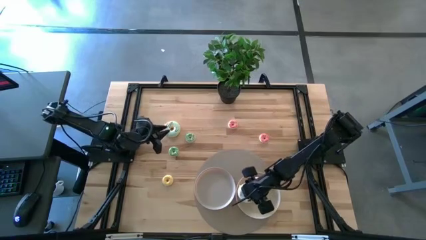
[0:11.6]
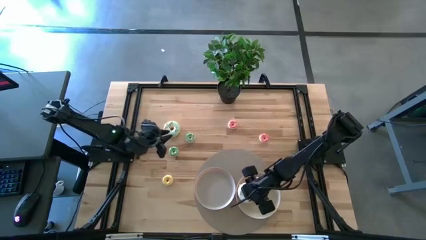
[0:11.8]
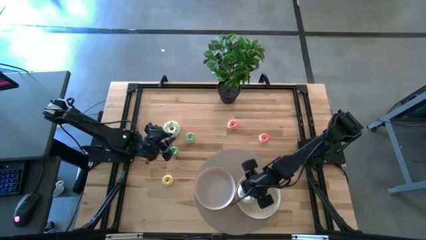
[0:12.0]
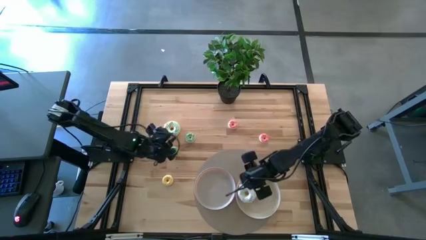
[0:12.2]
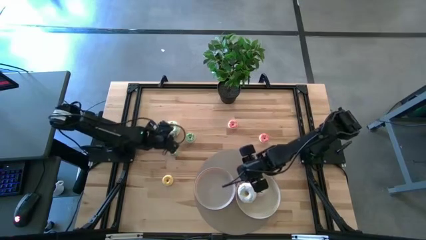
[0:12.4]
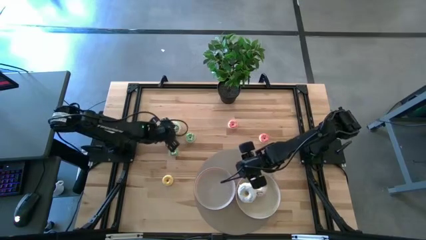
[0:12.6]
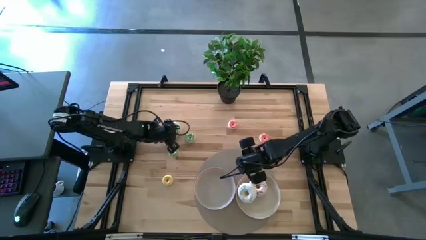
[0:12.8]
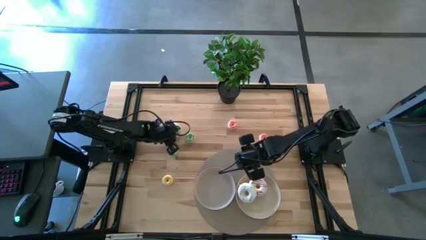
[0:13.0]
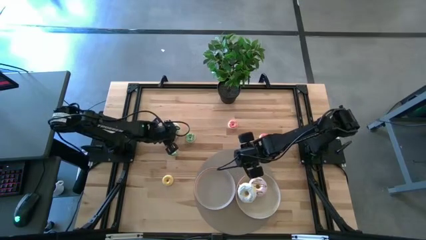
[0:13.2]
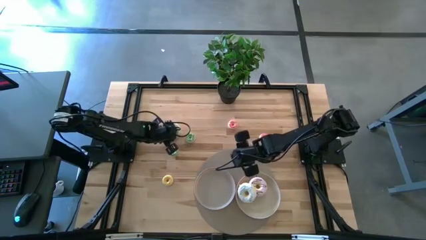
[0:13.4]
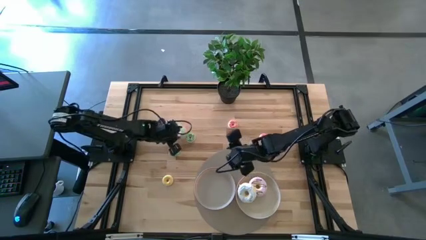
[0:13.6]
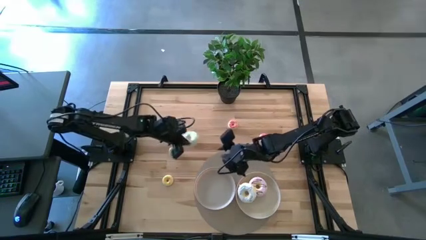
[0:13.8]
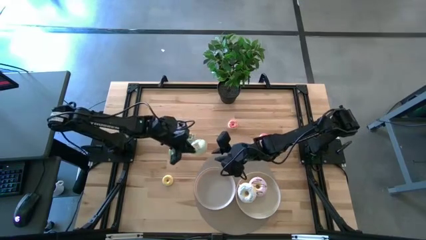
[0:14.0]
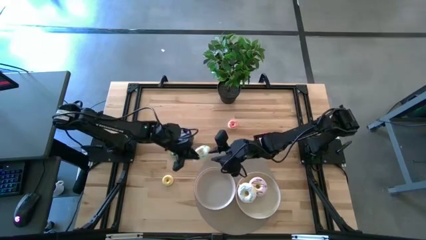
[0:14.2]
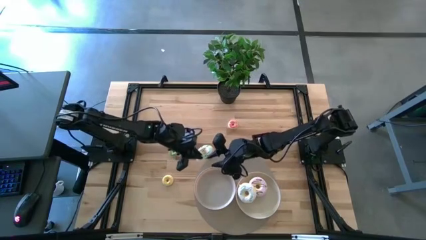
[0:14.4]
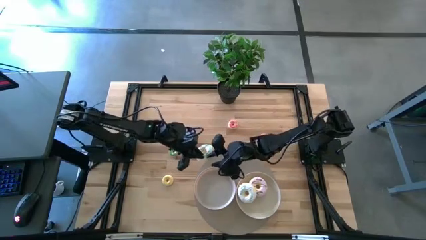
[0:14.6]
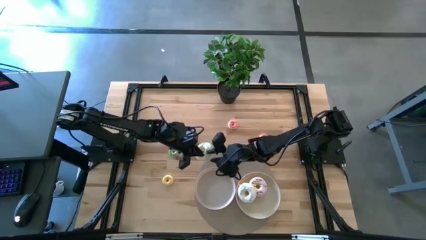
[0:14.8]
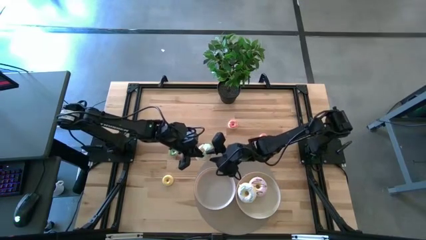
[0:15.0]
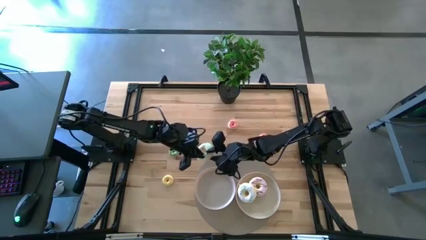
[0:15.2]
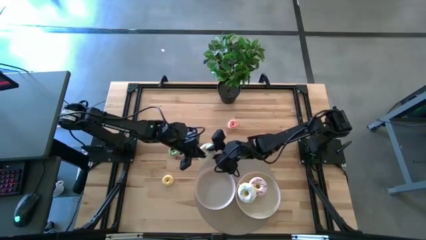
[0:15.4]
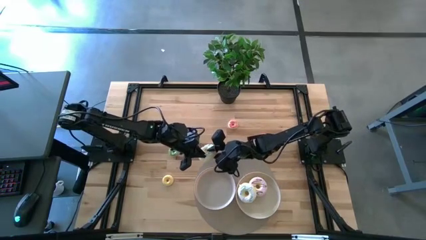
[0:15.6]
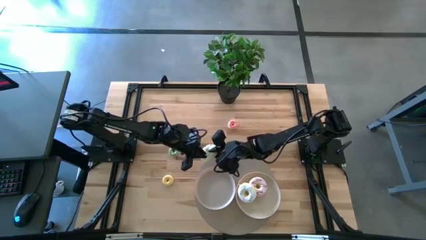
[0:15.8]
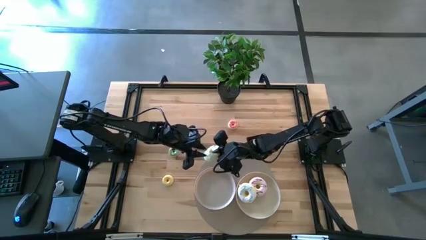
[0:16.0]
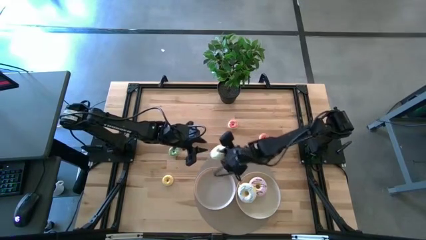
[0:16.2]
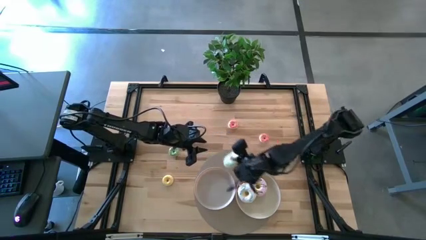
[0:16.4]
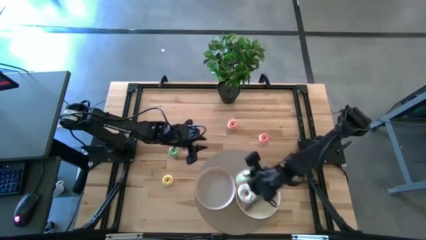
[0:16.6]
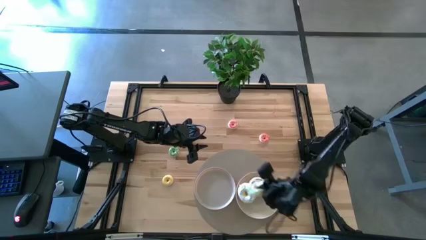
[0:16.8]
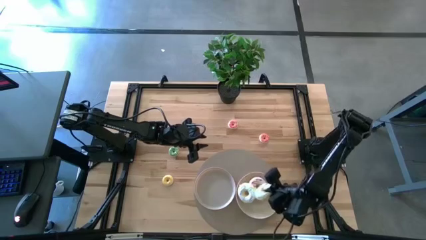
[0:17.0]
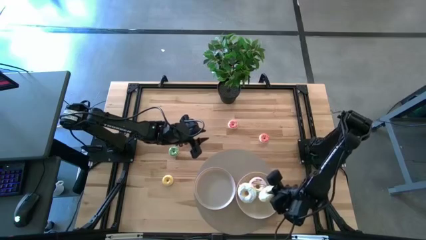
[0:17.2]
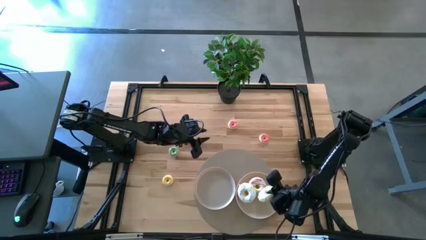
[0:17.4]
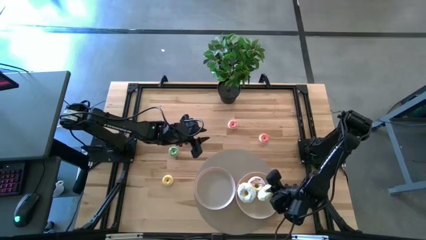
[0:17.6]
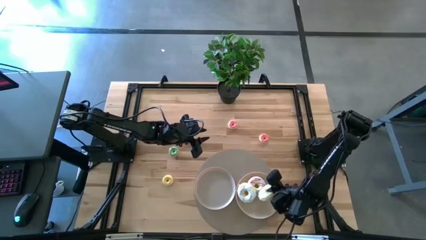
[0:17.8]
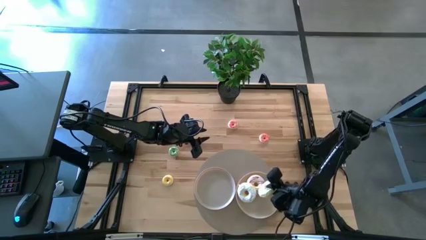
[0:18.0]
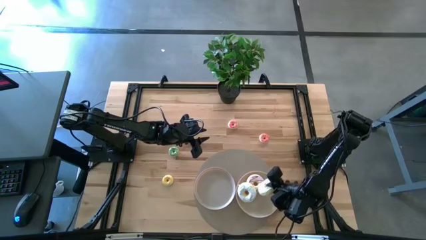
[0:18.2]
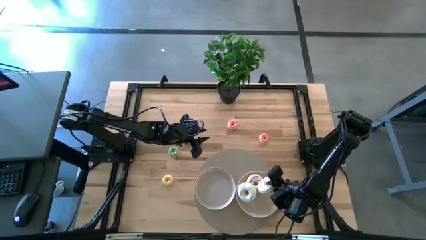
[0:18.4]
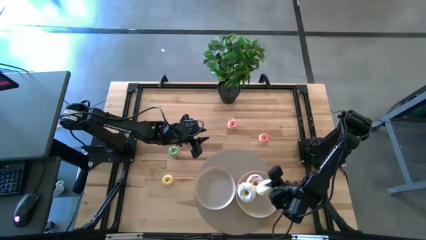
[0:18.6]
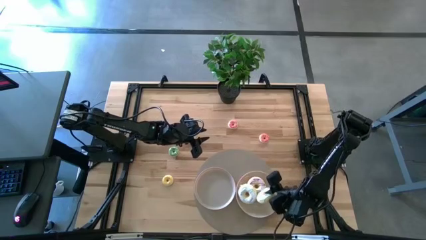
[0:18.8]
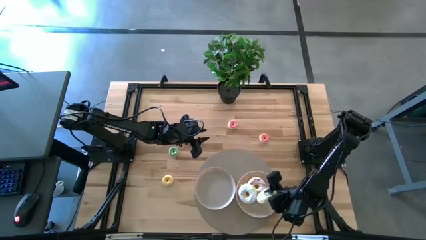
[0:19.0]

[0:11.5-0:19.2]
Task: Pick & Place donuts
Put the big light blue donut into the right grey plate

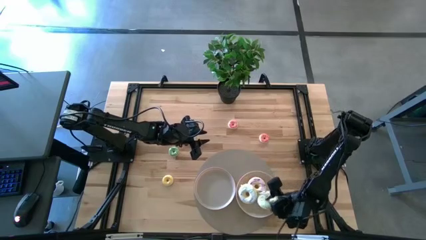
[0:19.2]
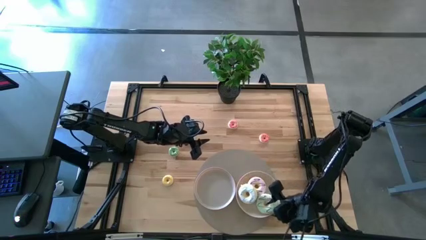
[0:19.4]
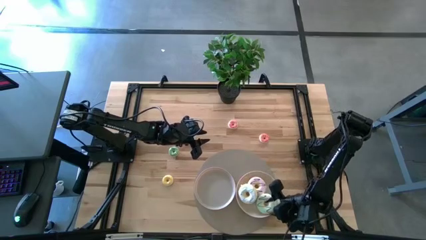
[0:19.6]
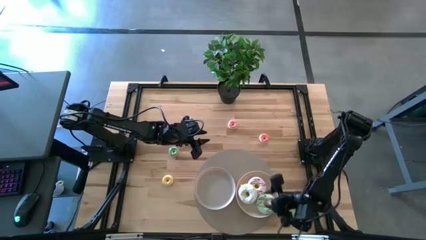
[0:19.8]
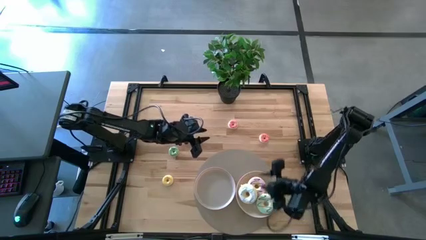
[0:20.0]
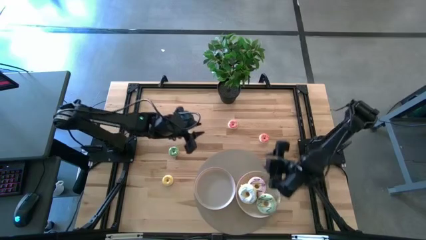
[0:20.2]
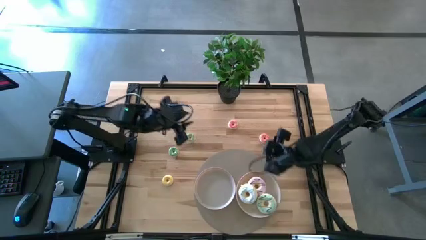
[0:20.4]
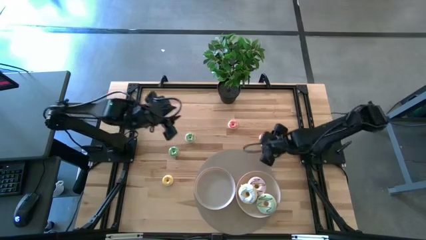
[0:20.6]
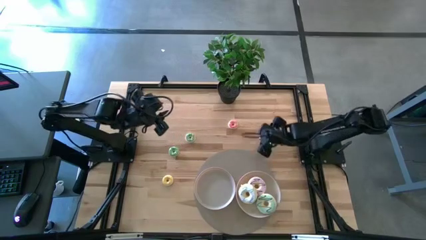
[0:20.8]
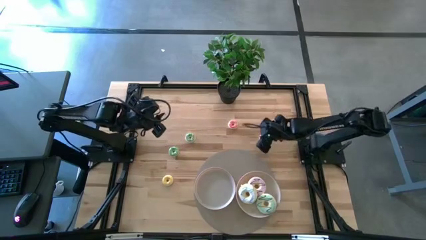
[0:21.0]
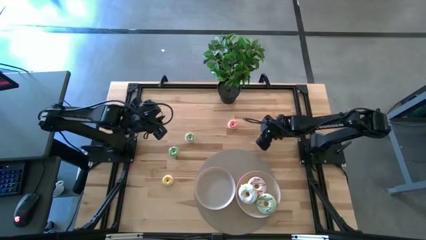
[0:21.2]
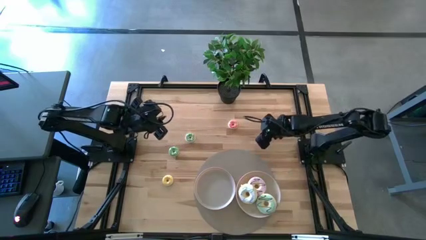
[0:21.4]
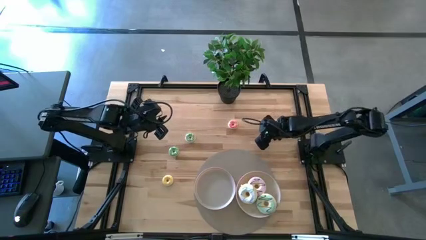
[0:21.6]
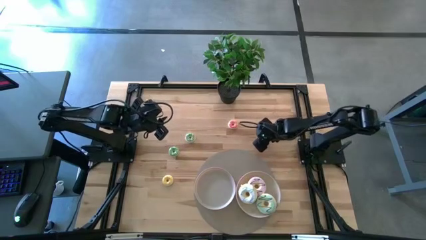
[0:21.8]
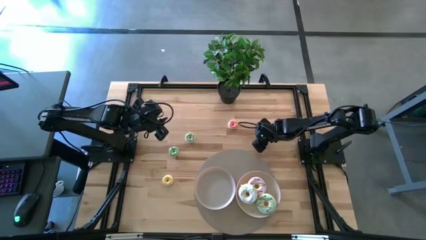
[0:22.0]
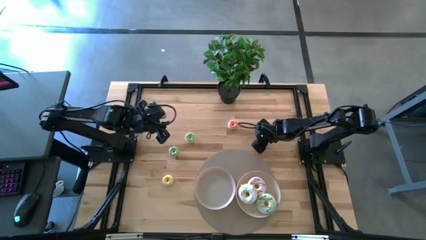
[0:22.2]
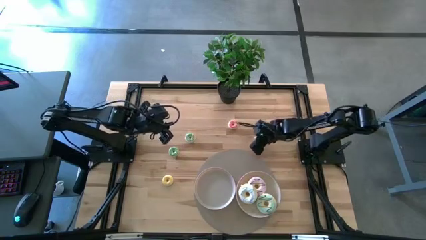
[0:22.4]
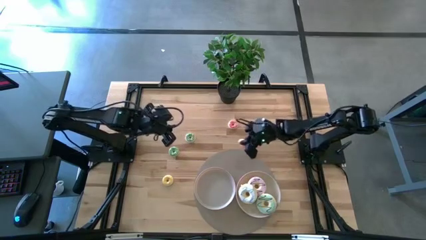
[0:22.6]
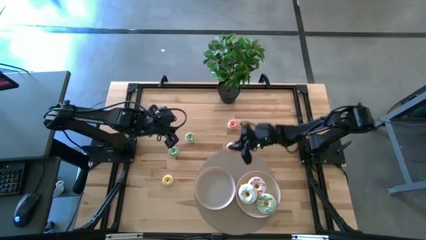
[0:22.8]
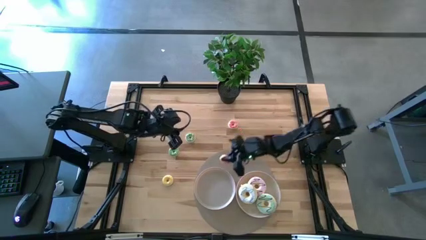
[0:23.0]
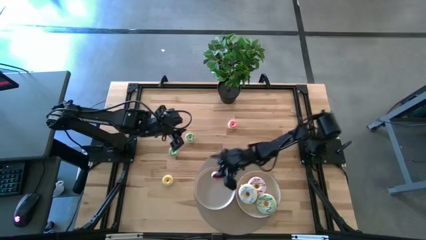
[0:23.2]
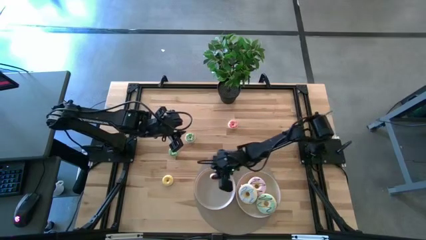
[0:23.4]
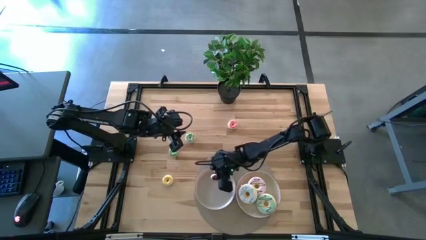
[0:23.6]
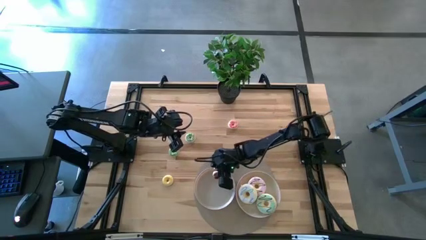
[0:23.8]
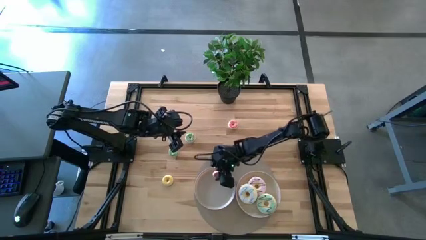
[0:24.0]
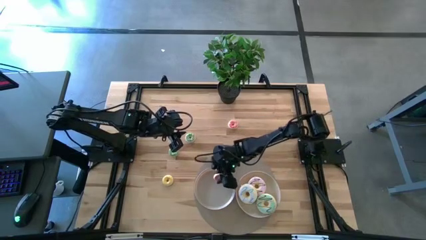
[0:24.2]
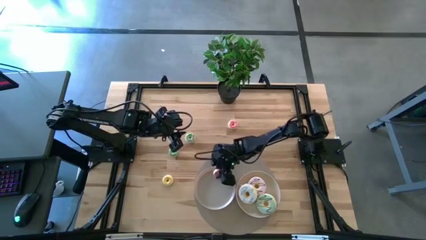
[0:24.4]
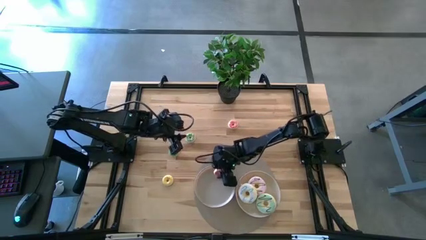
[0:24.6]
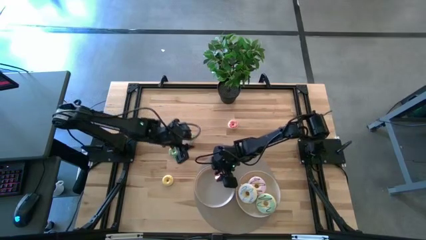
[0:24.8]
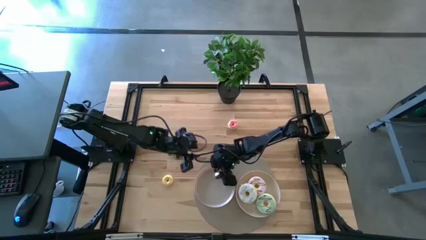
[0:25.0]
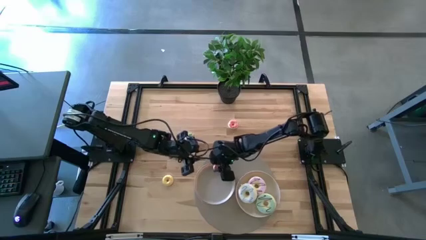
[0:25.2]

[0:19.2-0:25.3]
Put the right small pink donut into the left grey plate

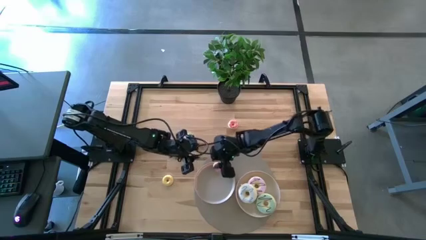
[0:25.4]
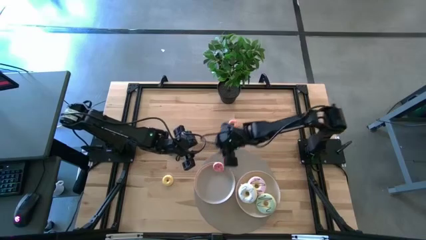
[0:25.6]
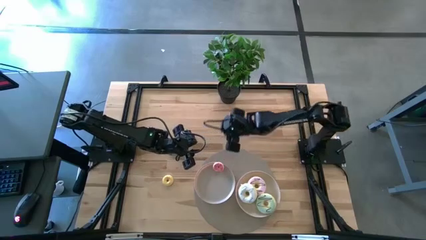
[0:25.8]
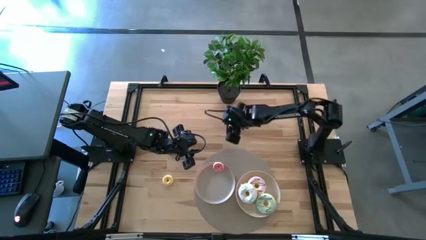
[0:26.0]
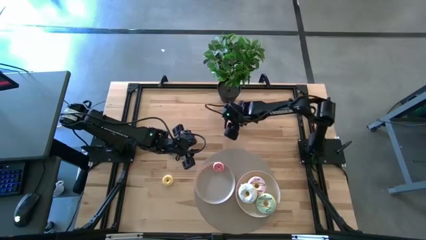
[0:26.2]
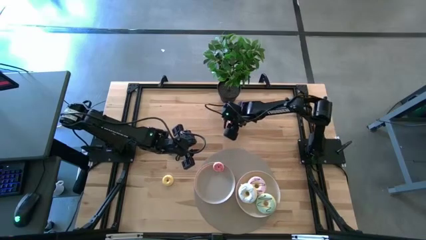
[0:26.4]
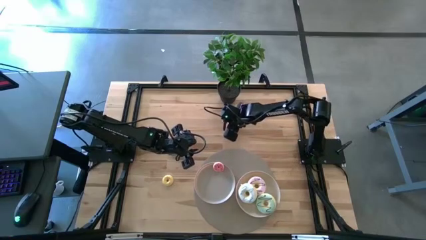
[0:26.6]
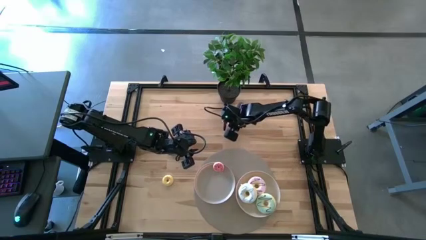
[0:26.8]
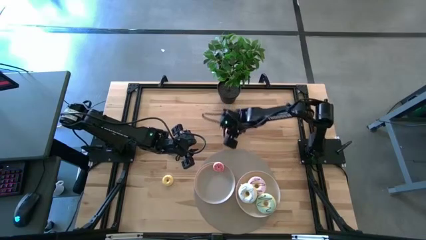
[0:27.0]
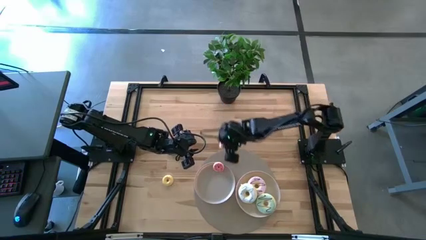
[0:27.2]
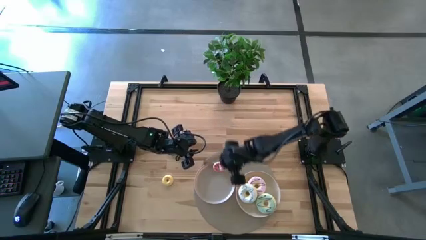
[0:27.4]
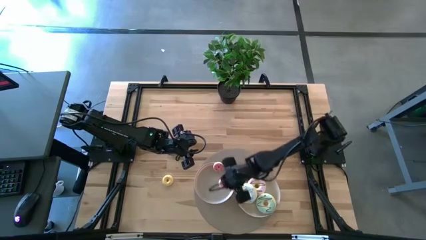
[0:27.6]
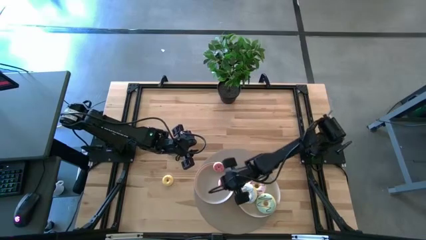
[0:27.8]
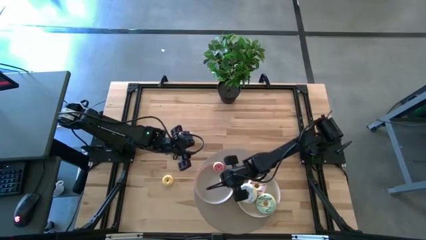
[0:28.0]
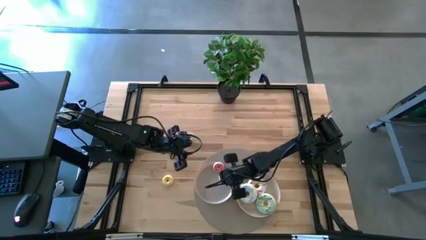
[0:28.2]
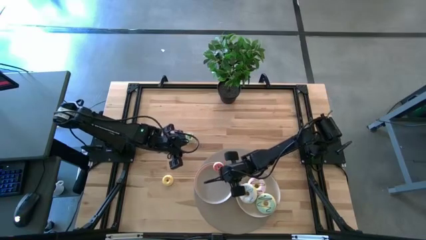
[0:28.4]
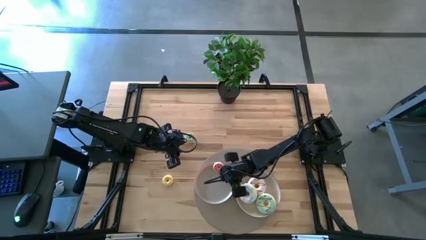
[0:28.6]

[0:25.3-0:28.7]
Put the small pink donut into the left grey plate
